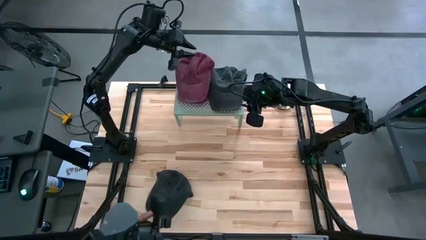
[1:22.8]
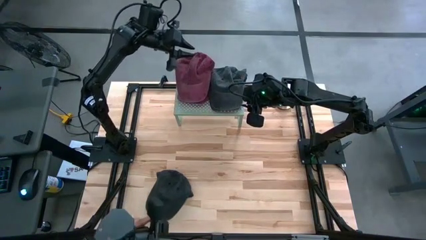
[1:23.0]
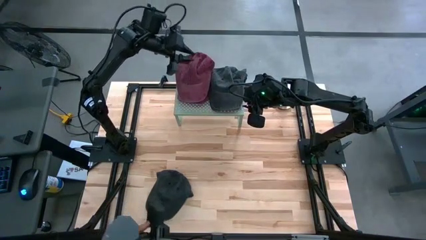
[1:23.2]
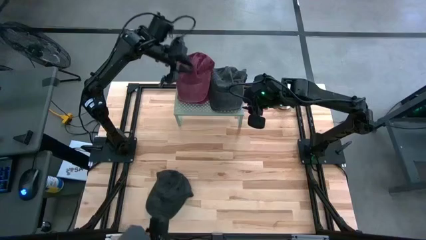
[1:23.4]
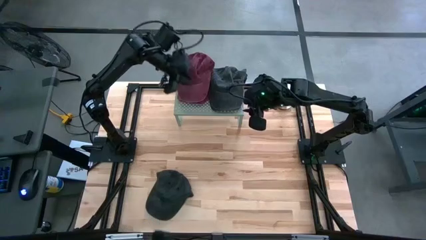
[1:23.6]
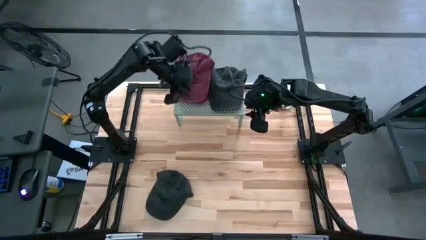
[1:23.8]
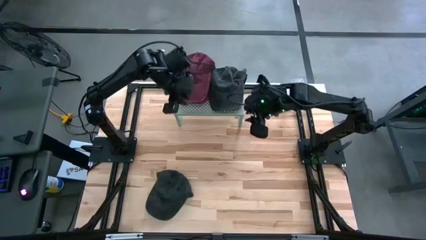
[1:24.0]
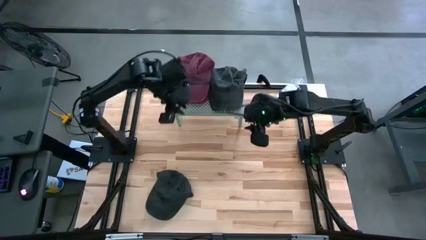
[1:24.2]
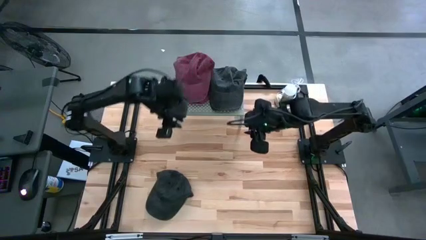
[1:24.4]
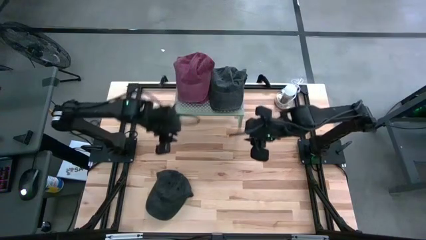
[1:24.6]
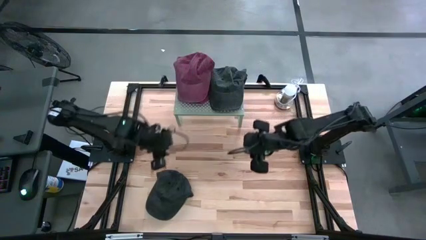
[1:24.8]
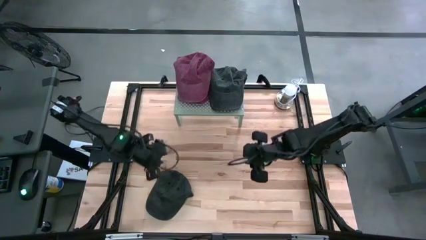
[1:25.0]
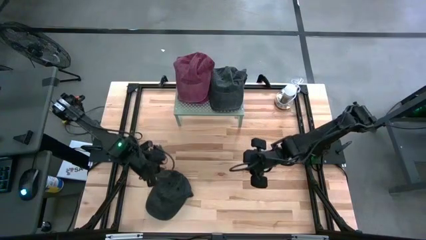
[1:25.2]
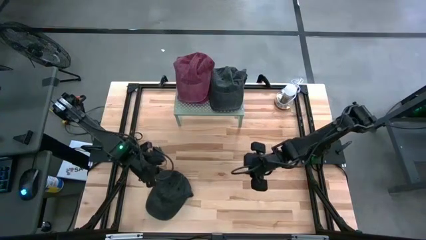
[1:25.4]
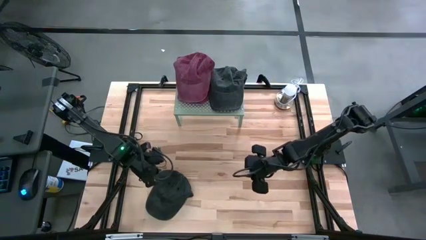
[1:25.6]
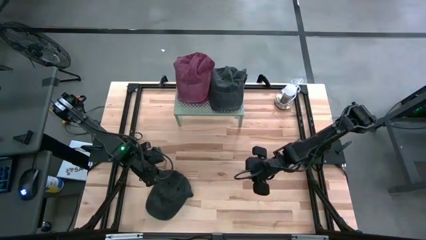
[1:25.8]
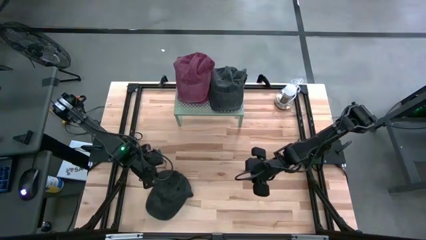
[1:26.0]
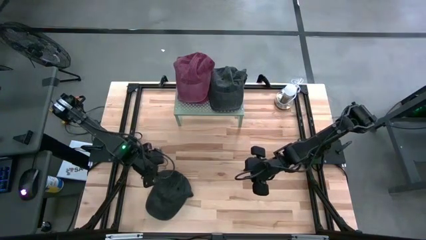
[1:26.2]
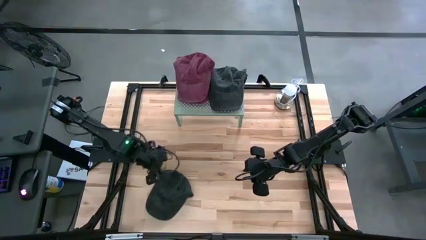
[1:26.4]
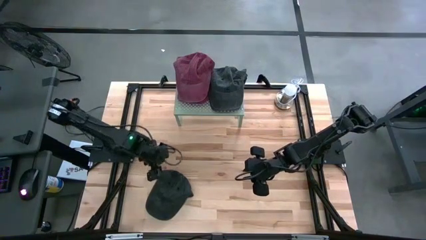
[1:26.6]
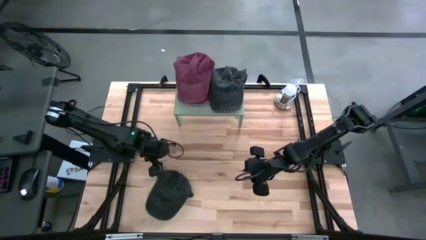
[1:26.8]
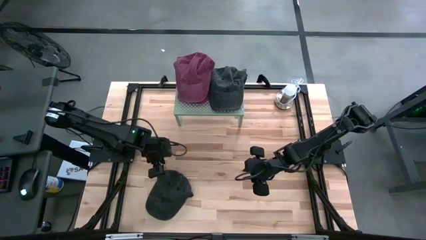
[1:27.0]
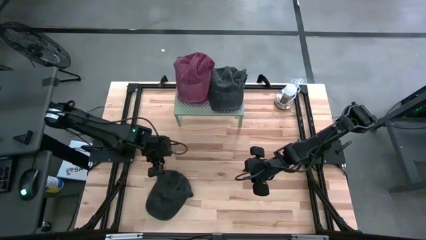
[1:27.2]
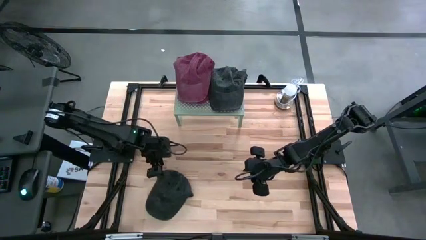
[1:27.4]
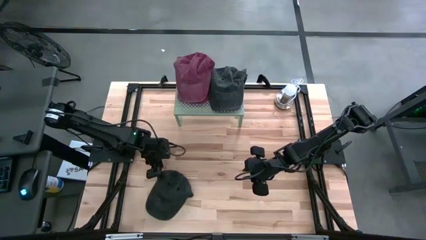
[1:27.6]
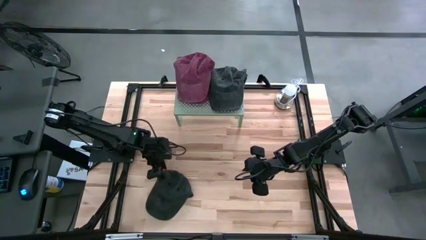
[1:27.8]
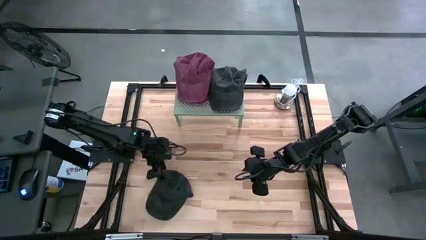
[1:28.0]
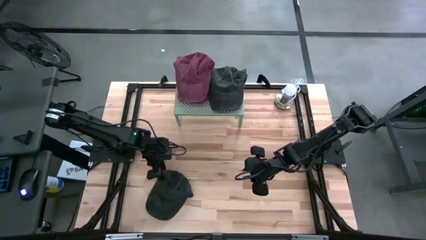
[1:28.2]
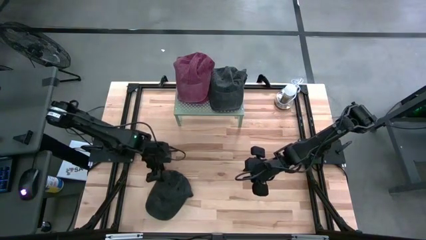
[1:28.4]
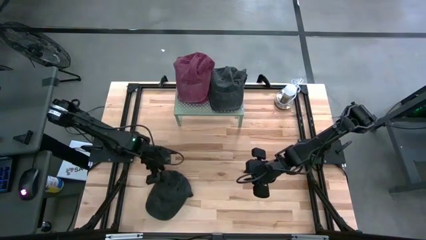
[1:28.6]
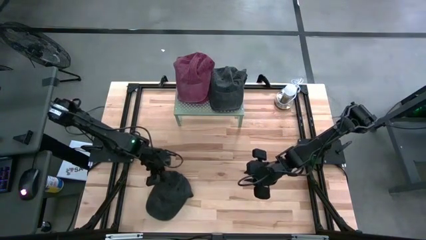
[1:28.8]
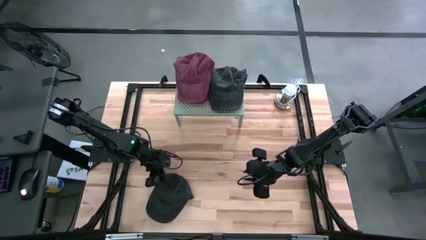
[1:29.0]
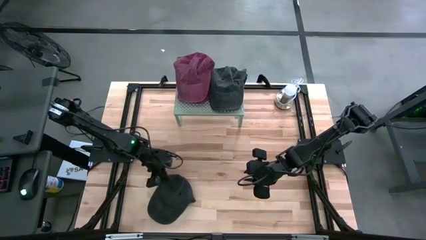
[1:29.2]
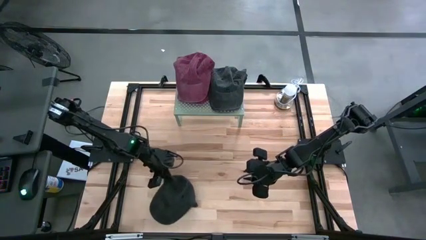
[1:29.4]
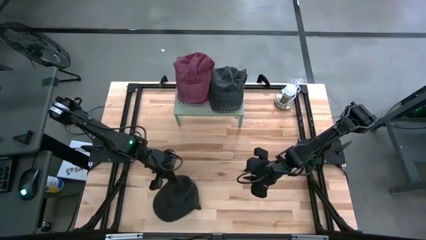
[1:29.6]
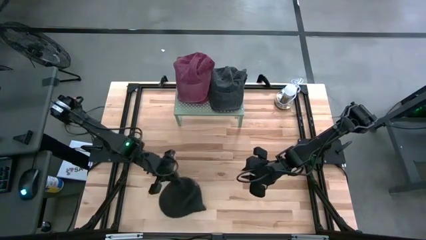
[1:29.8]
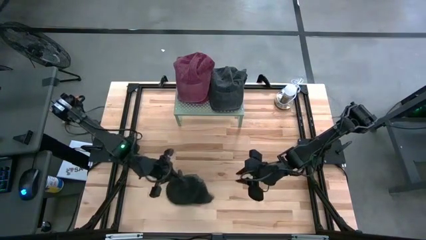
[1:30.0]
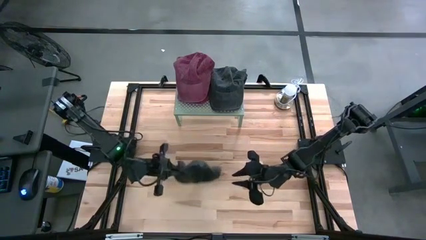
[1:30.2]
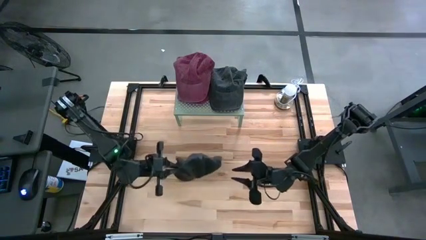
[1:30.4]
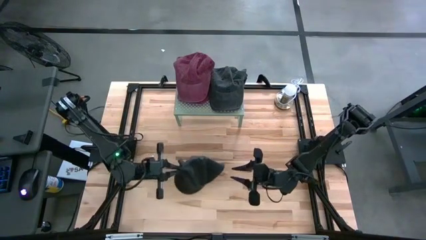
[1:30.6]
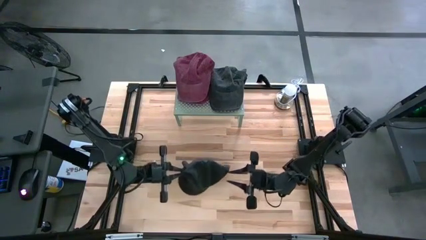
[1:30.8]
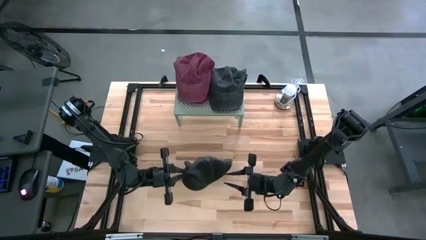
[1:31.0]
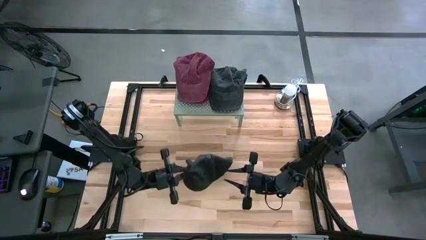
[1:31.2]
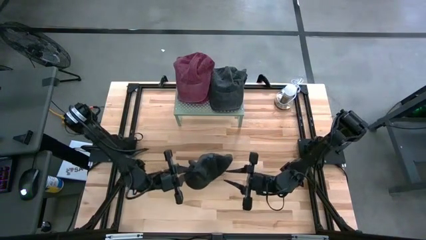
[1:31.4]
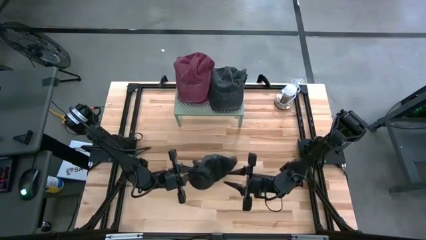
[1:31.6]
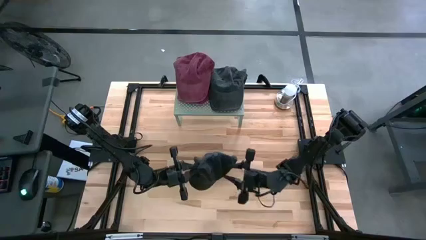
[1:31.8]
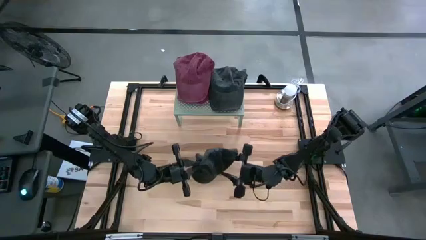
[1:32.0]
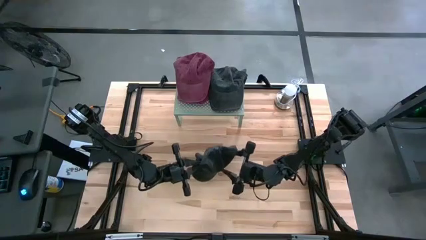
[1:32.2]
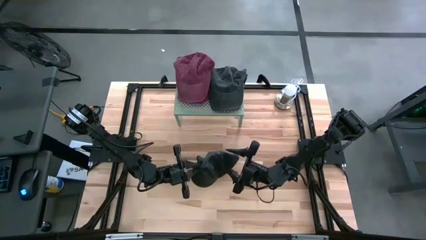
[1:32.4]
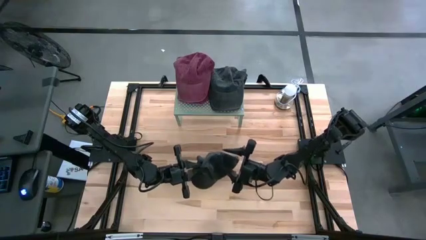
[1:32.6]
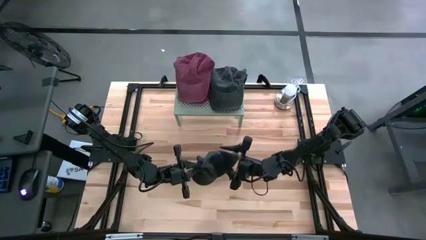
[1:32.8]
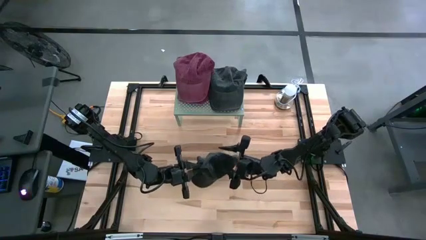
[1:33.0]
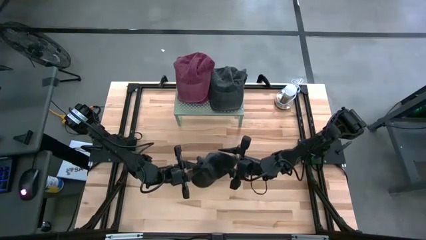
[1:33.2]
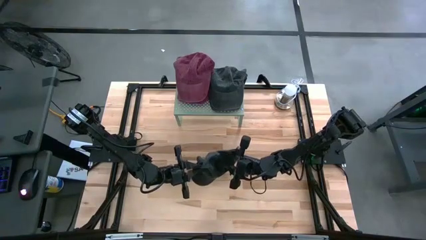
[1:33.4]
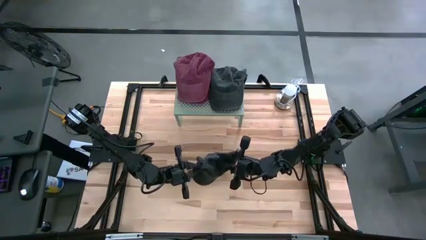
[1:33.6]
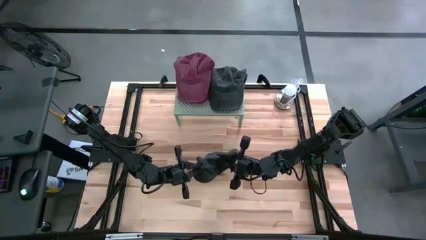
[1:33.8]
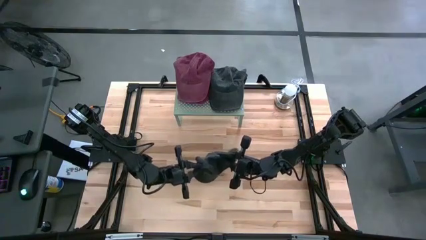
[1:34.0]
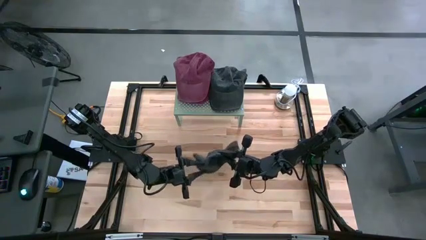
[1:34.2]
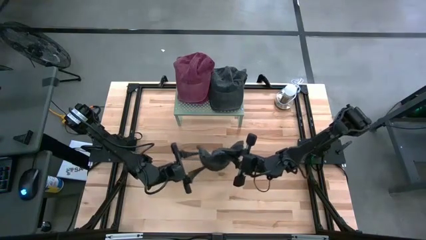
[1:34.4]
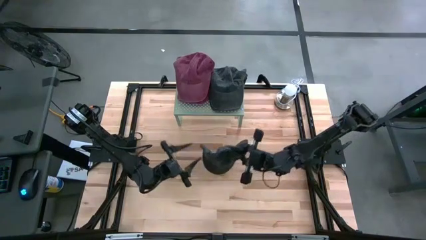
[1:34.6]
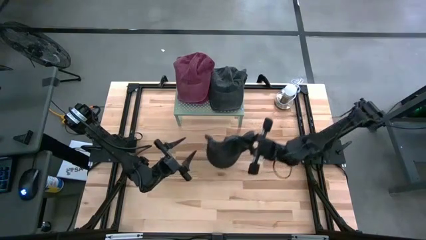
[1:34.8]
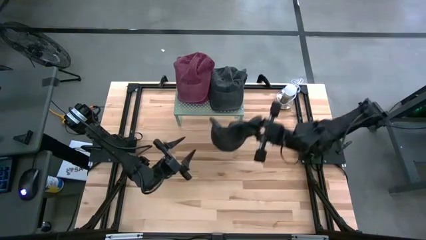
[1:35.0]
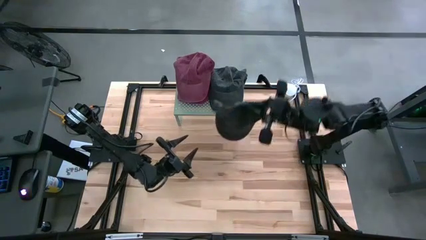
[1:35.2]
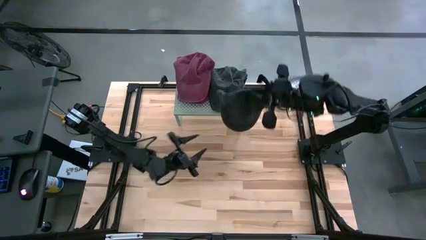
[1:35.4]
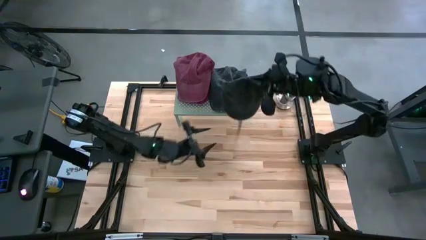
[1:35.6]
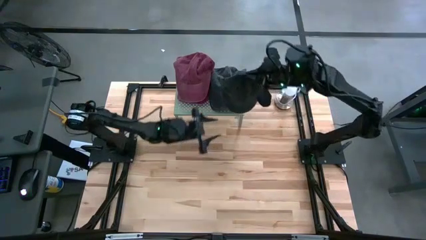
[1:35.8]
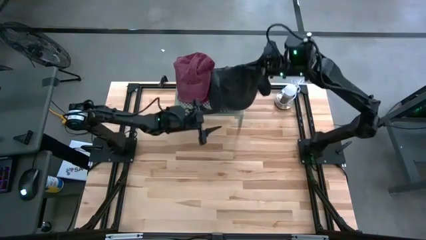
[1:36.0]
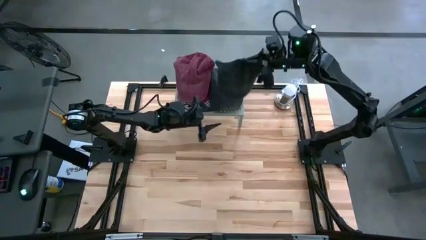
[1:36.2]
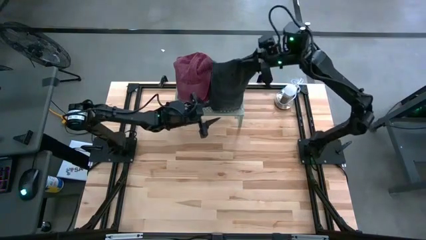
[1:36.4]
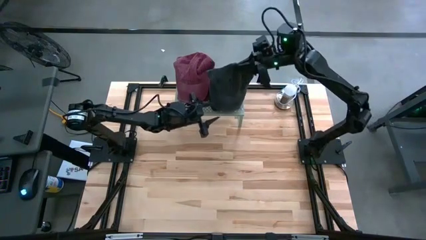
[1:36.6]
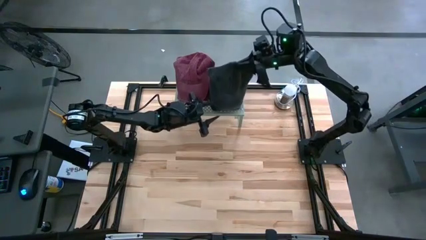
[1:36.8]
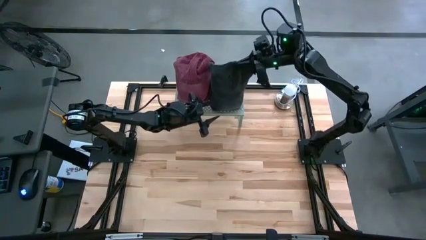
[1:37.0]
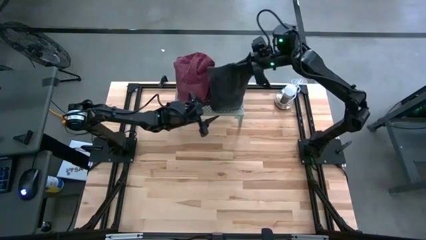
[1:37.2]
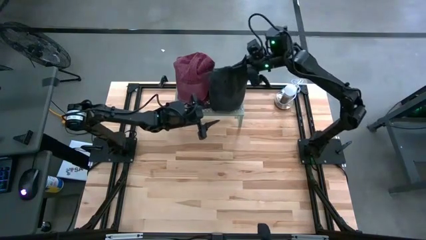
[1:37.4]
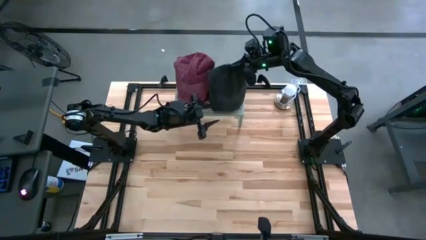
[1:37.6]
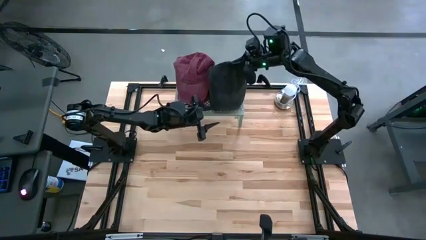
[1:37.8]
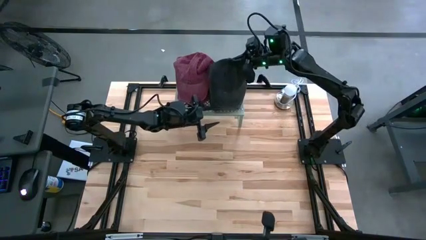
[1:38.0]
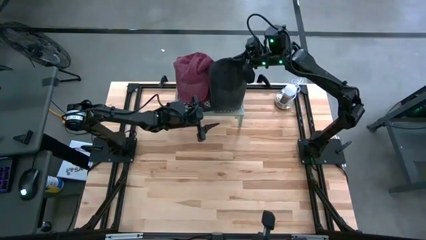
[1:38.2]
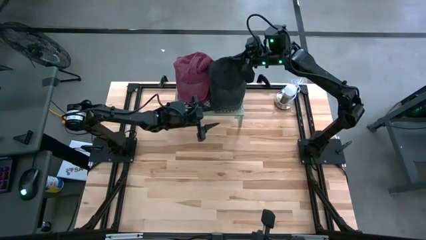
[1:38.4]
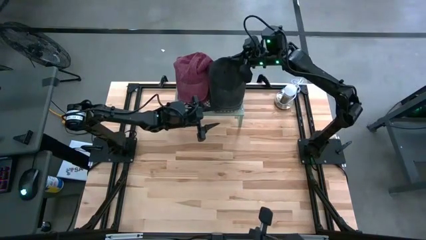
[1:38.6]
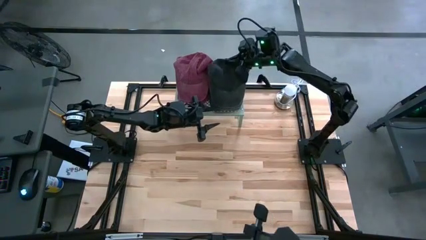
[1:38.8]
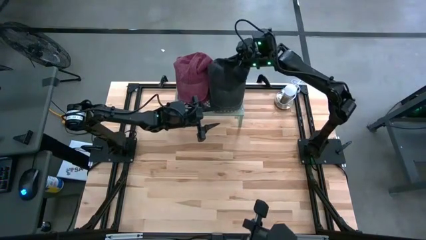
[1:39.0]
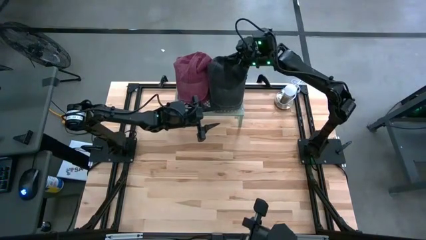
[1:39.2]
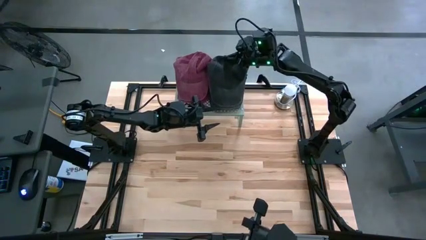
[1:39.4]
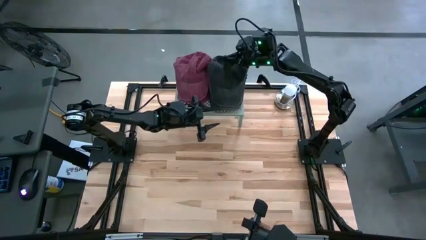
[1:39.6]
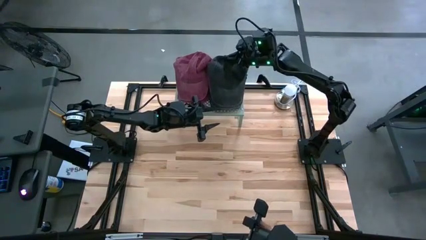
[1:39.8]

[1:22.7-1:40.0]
Task: Pick & Place hat
Stack the black caps on top of black cap on the shelf
